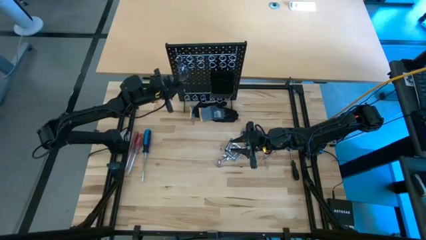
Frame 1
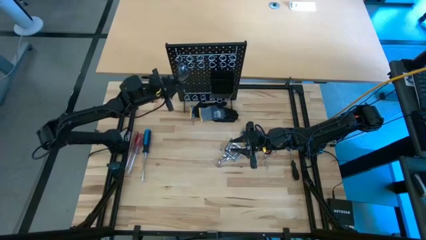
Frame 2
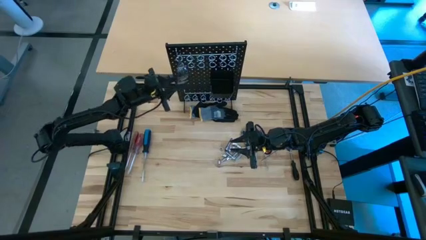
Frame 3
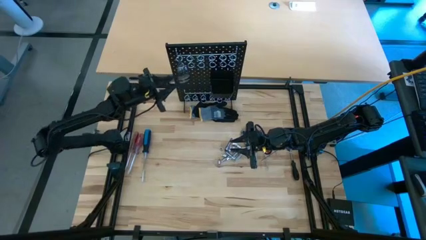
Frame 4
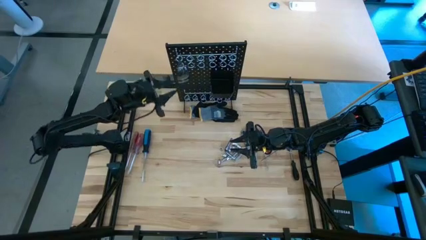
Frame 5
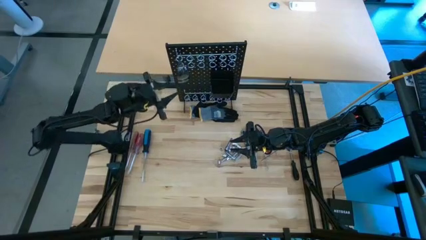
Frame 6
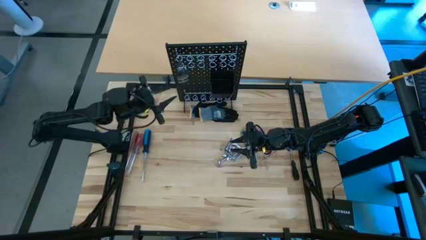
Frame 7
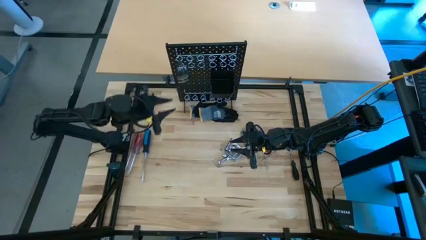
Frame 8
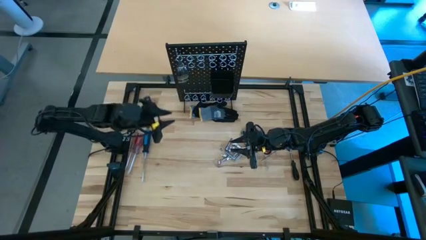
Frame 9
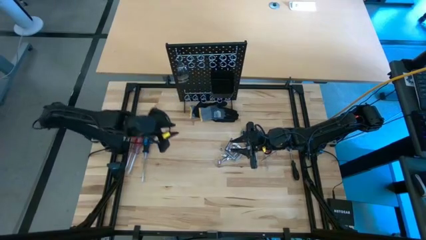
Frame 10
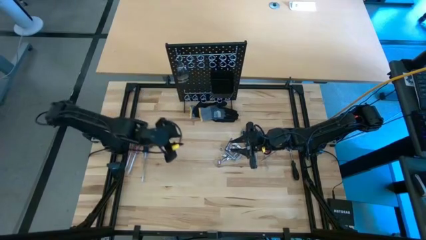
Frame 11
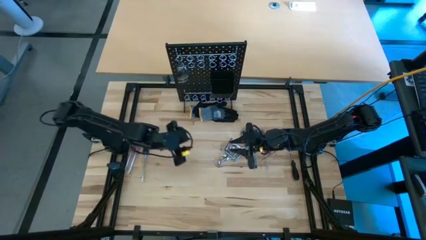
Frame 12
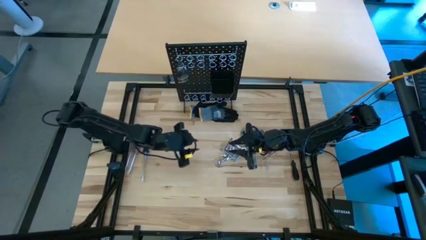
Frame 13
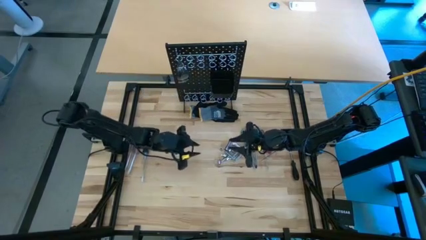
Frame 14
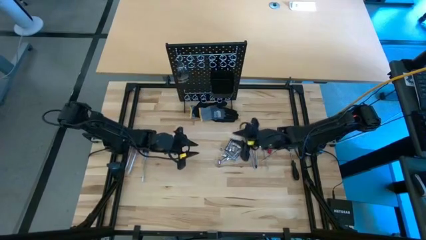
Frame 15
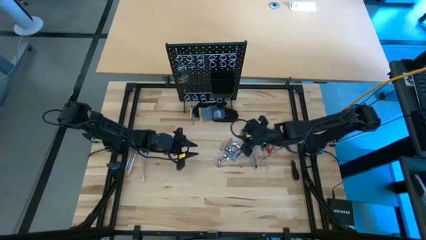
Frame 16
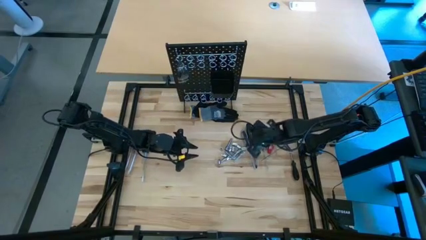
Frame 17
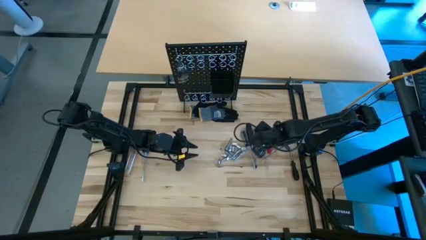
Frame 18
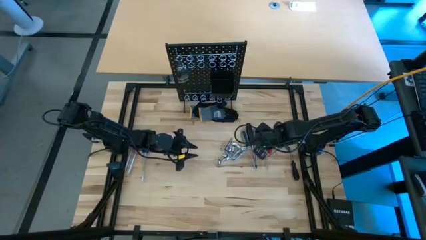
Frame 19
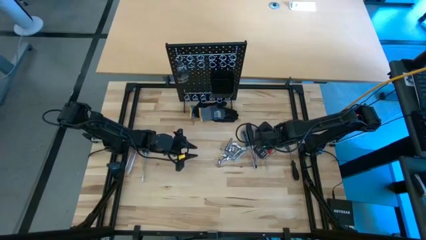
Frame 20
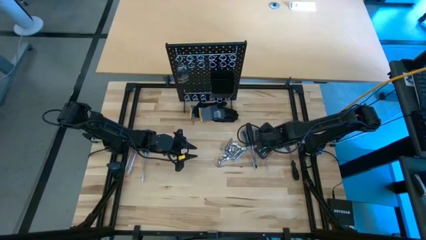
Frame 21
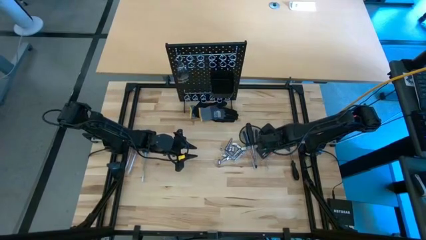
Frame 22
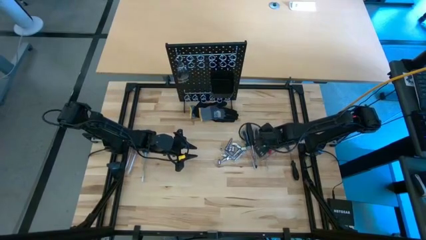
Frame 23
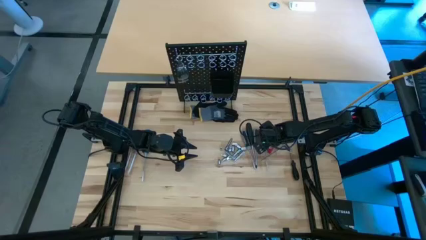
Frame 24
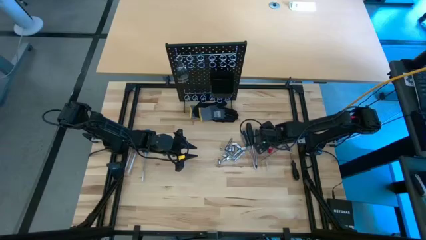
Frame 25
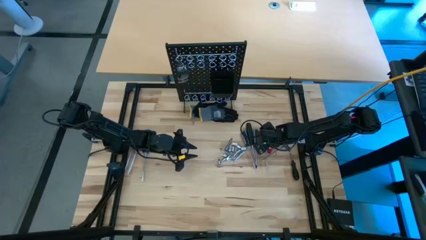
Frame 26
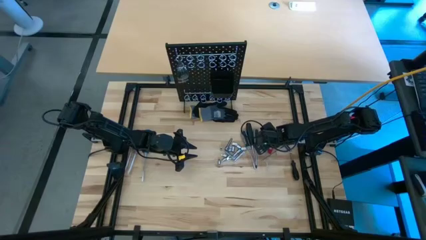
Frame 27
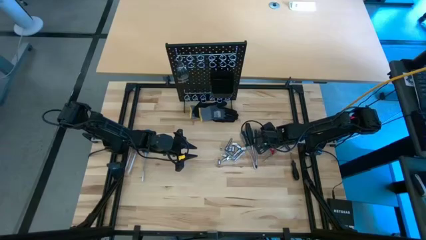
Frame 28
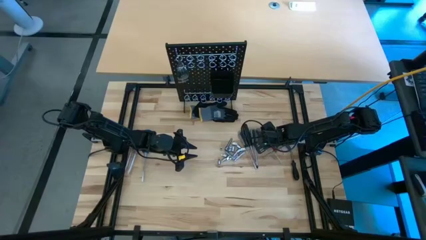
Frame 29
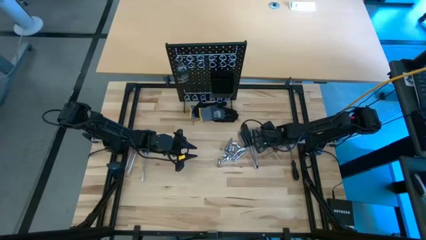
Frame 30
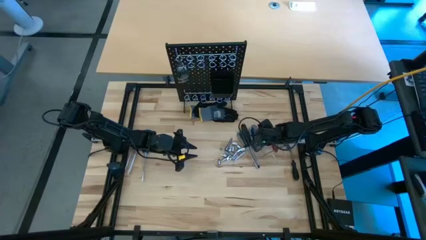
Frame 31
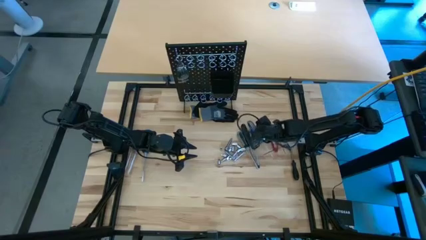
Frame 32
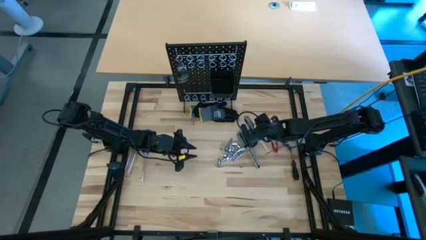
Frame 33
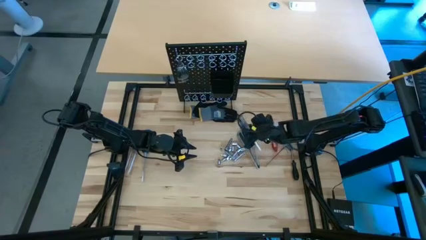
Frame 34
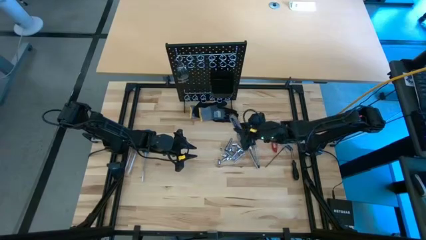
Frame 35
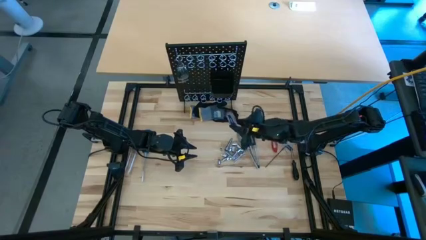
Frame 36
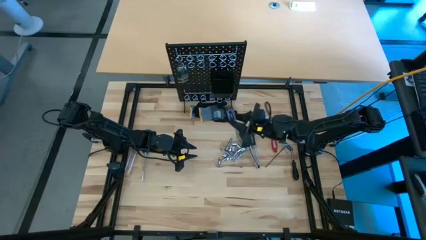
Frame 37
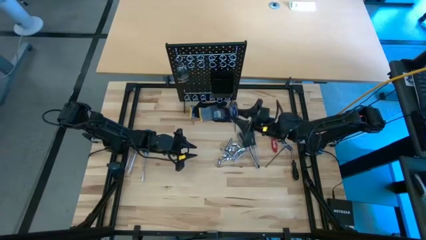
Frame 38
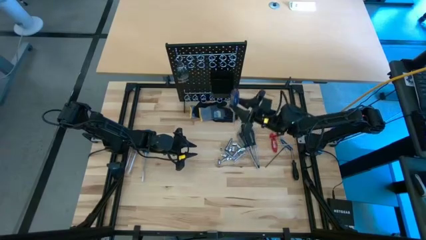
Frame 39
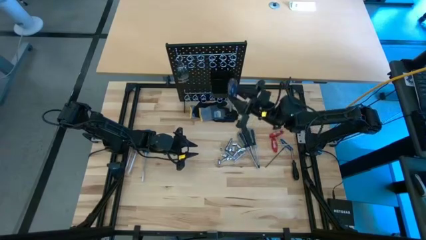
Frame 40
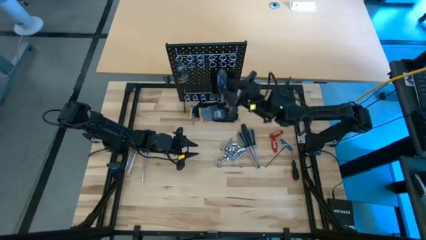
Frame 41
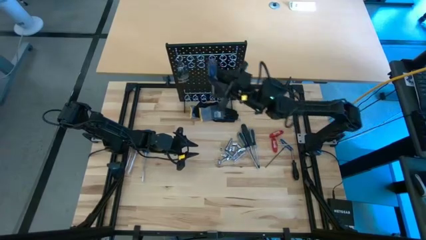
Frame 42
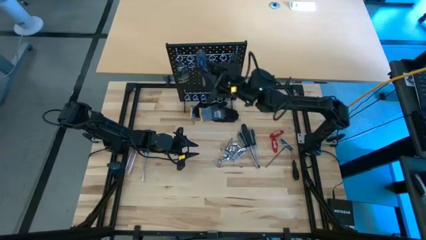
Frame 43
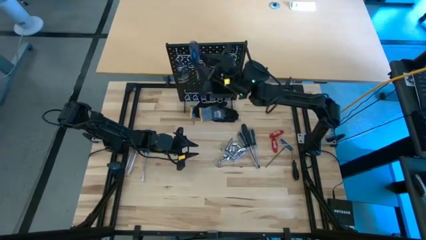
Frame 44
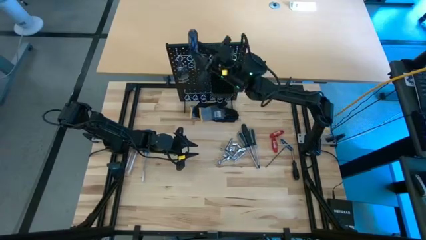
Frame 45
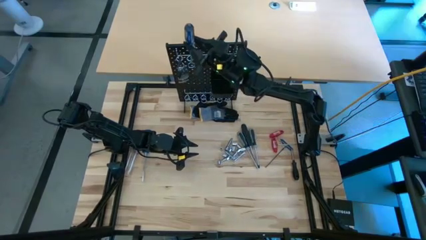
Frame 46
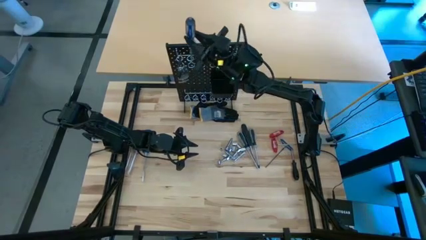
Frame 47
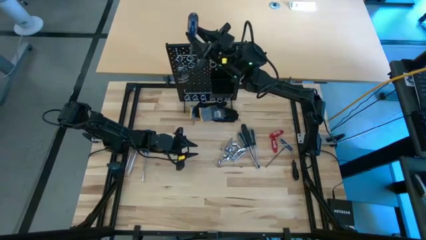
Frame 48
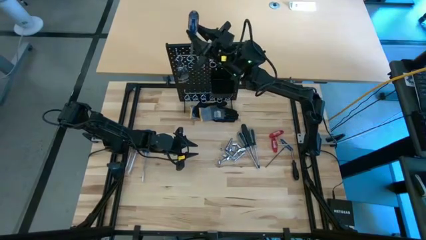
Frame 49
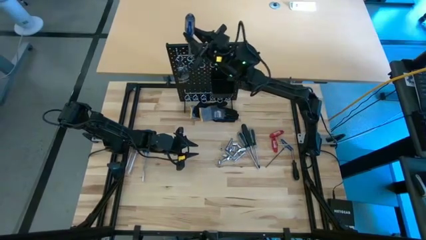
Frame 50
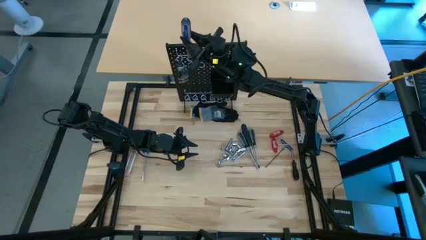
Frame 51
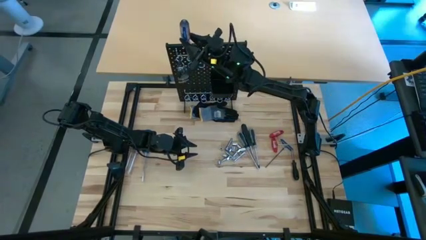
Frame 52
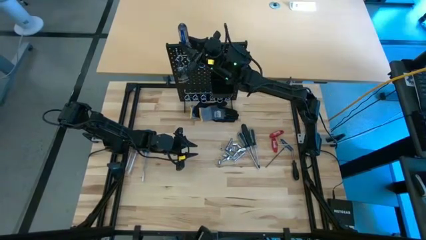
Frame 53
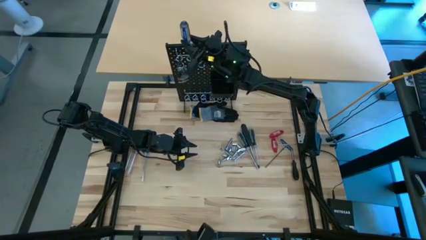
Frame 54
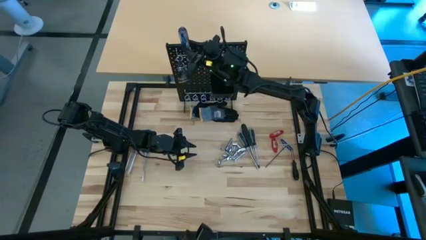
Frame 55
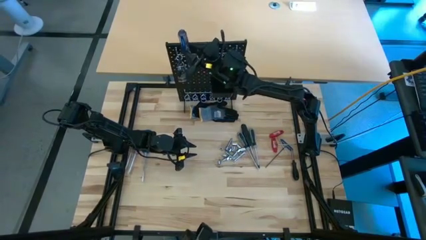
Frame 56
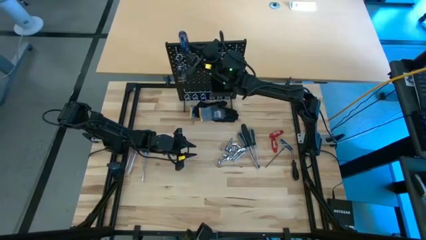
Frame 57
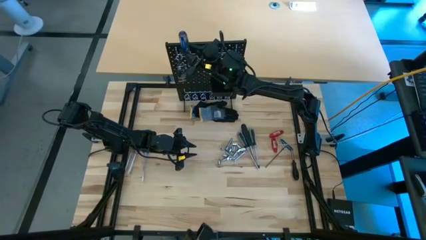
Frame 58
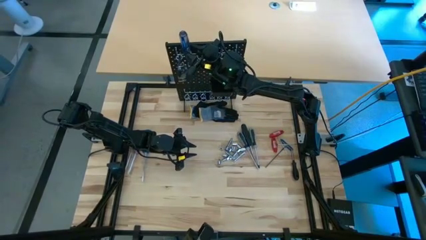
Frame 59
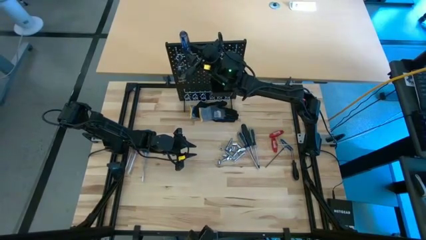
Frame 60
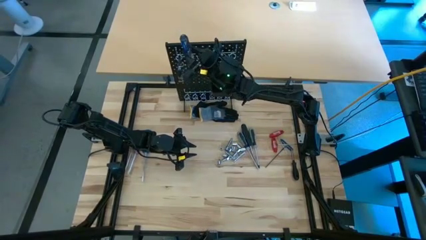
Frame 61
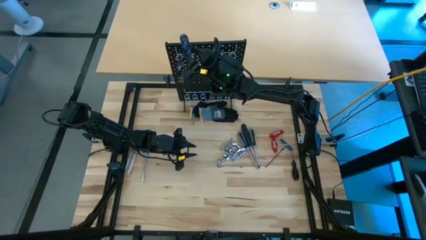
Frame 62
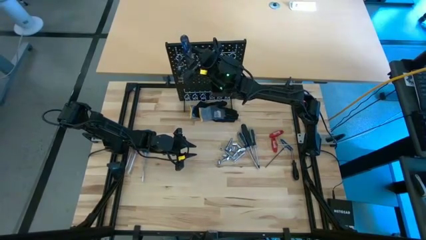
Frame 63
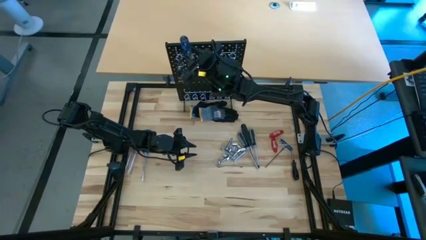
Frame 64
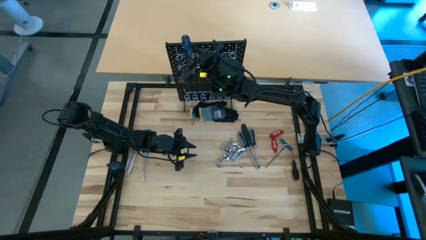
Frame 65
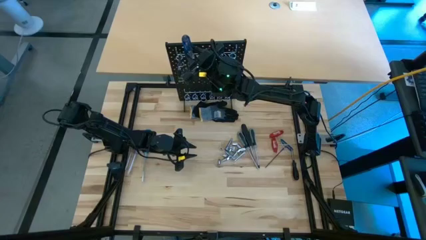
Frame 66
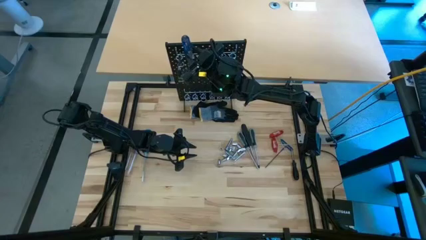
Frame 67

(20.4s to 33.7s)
Task: Hang tools onto peg board
Hang the blue screwdriver on the pegboard

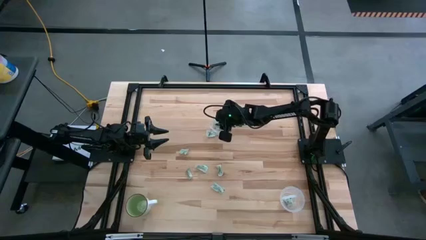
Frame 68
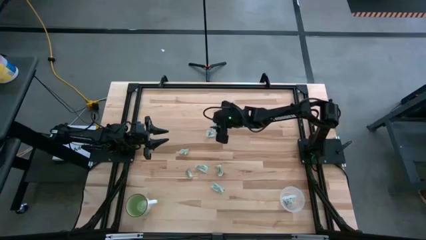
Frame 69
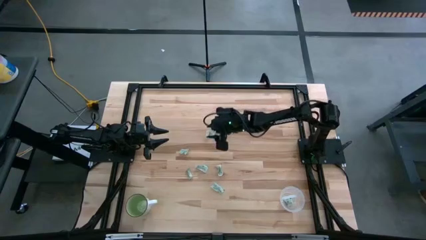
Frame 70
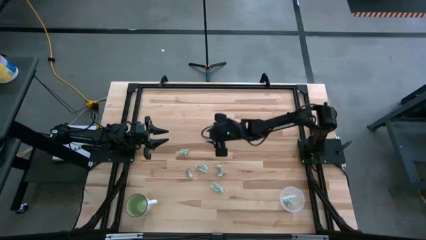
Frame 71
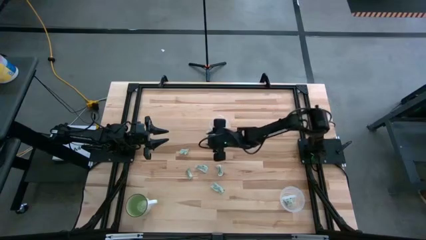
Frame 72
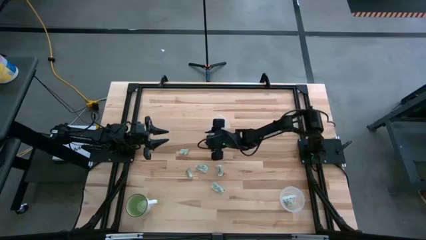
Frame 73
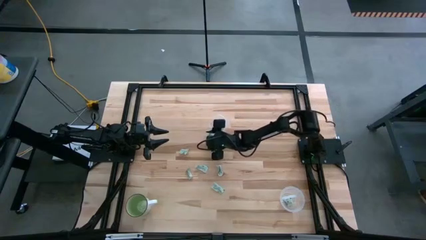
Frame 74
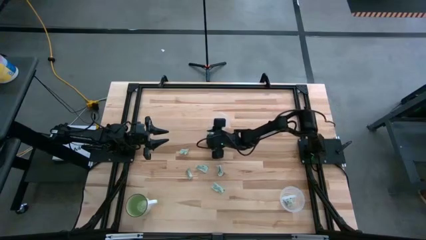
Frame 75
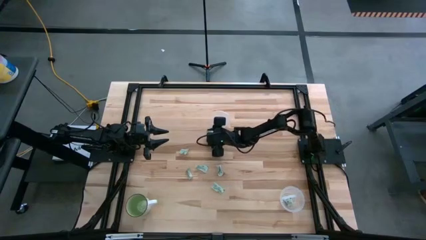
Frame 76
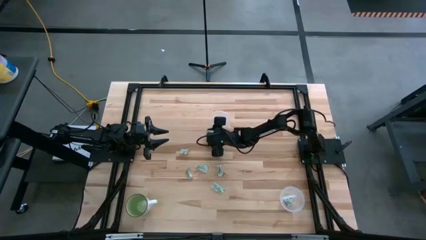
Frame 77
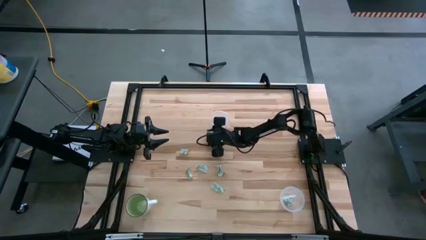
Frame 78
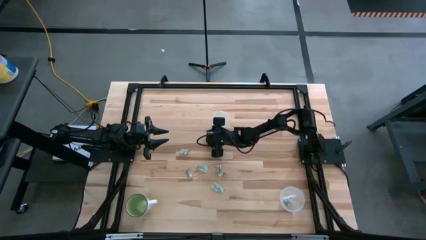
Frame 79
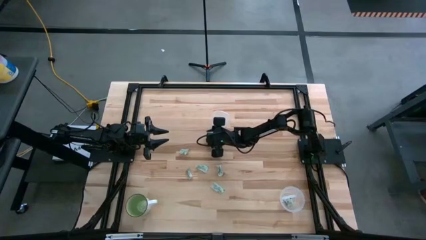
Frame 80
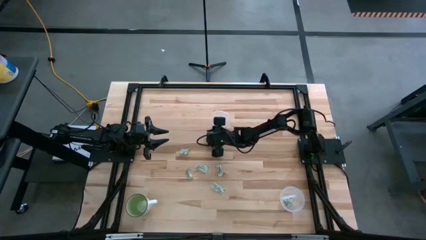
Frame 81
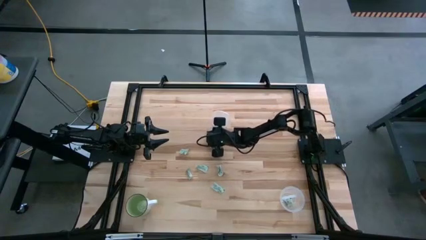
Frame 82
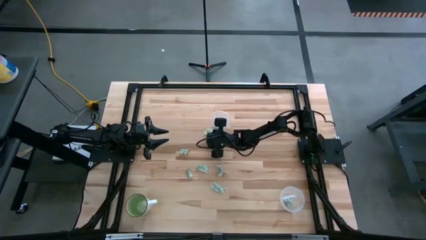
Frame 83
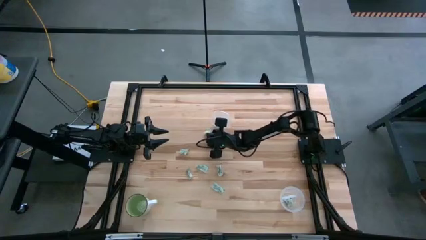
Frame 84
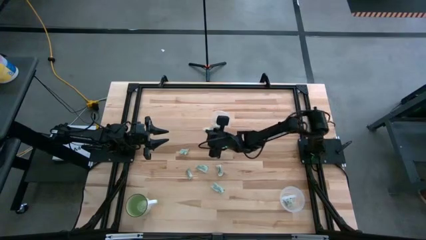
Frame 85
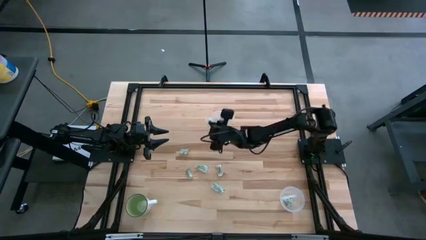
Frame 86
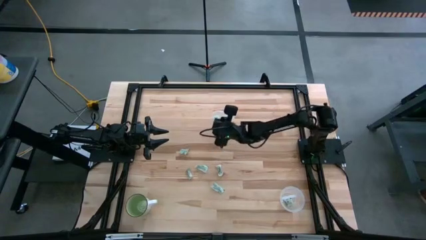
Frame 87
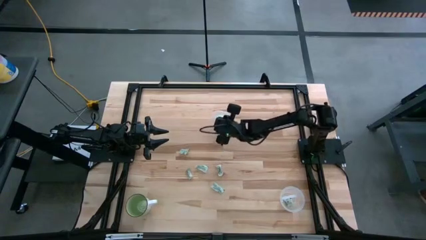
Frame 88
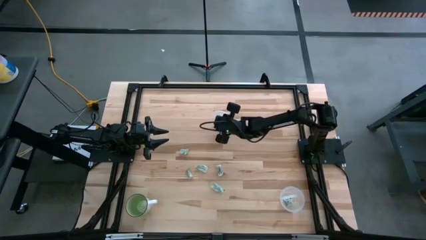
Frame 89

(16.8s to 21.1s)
Task: Pick and place items into bin
Put the green stevia packet into the square transparent bin
